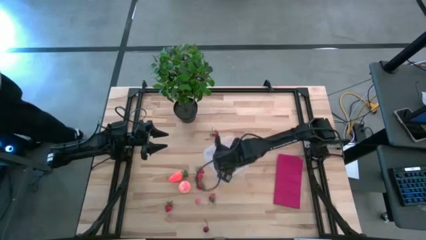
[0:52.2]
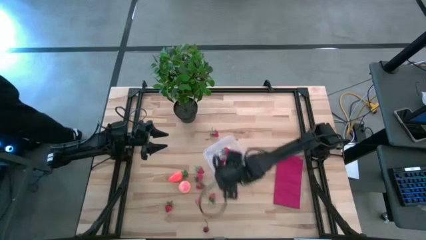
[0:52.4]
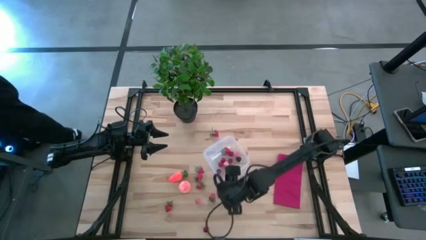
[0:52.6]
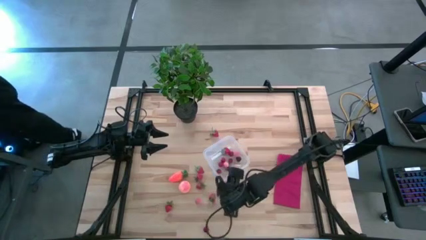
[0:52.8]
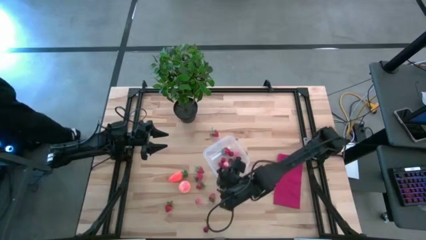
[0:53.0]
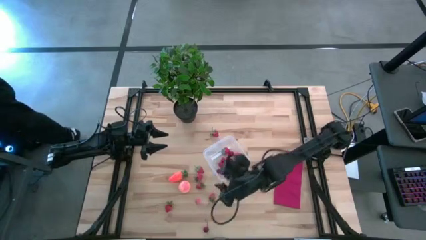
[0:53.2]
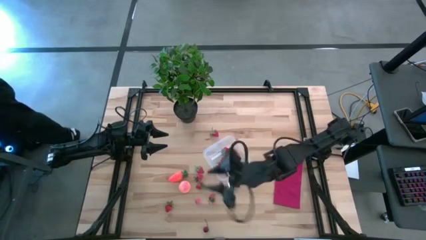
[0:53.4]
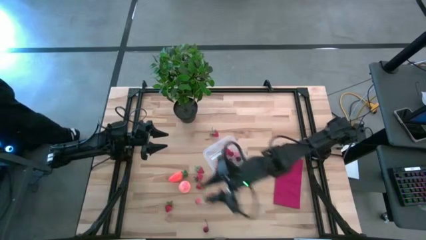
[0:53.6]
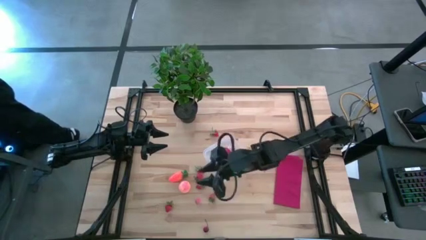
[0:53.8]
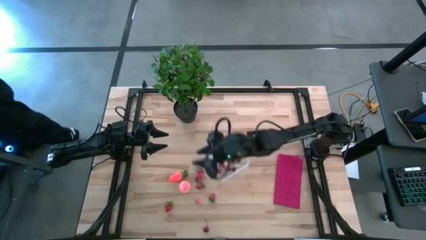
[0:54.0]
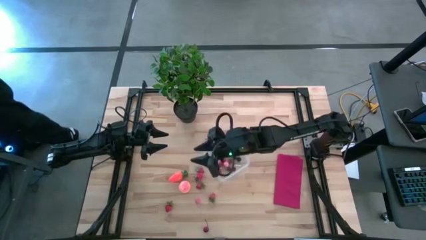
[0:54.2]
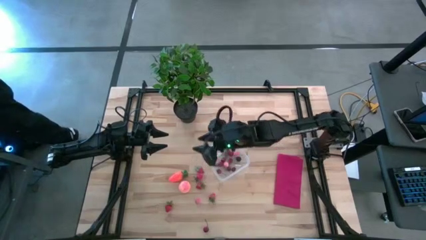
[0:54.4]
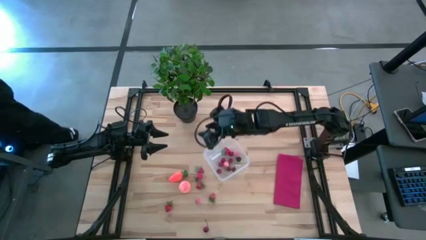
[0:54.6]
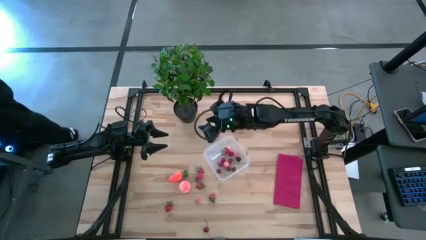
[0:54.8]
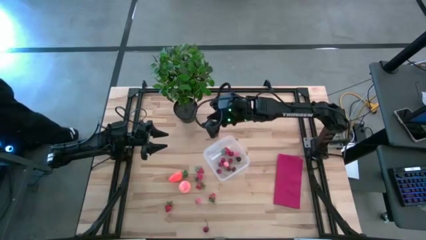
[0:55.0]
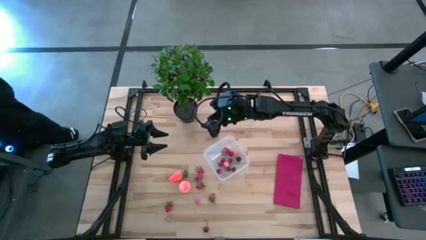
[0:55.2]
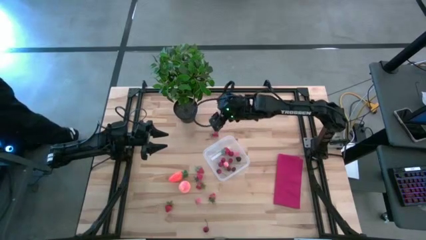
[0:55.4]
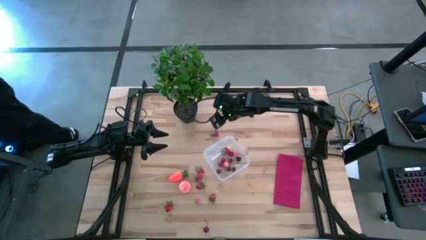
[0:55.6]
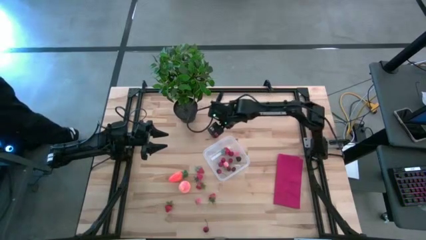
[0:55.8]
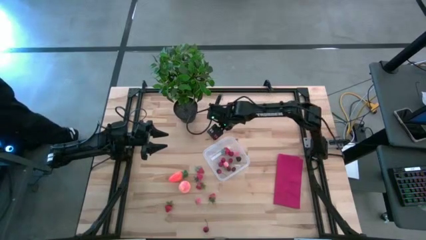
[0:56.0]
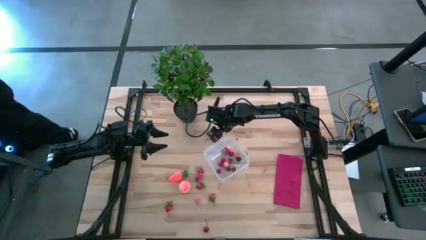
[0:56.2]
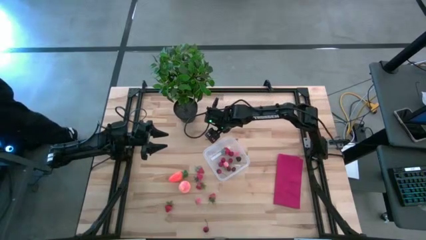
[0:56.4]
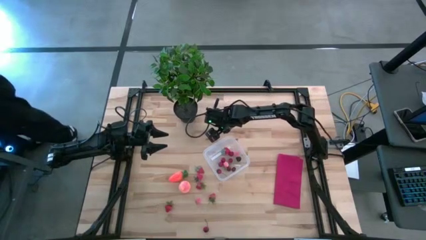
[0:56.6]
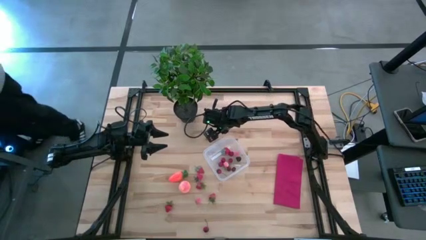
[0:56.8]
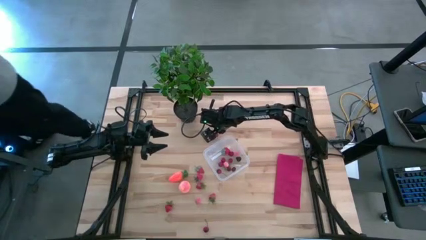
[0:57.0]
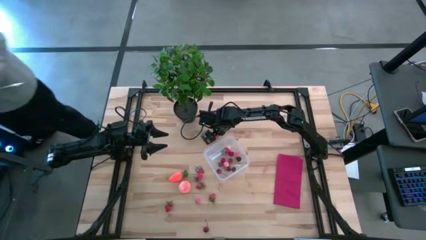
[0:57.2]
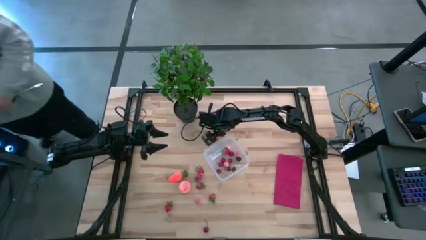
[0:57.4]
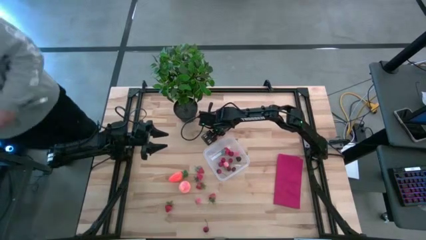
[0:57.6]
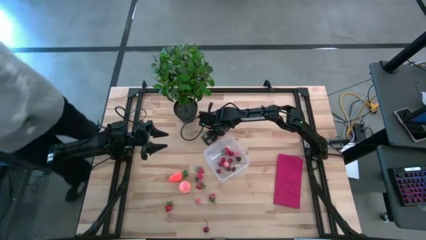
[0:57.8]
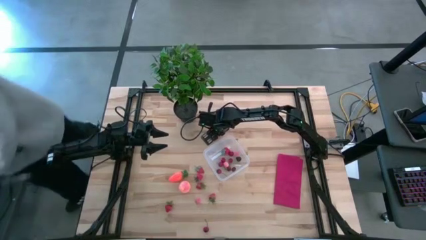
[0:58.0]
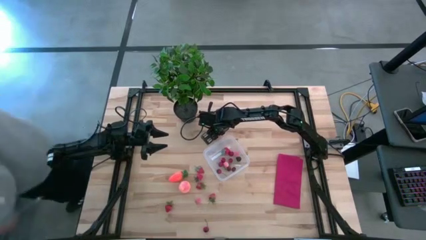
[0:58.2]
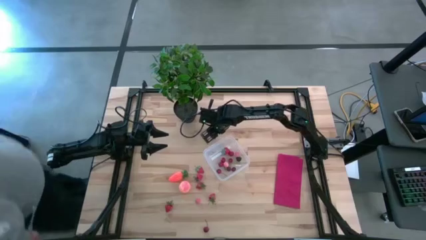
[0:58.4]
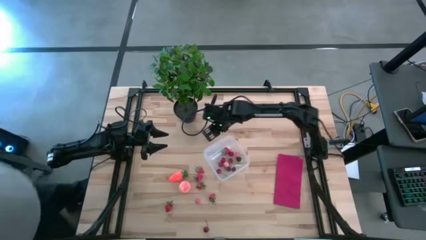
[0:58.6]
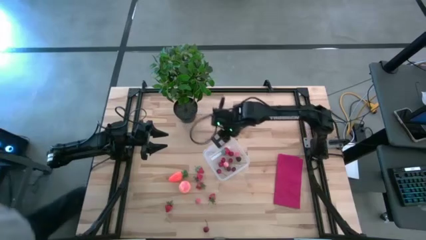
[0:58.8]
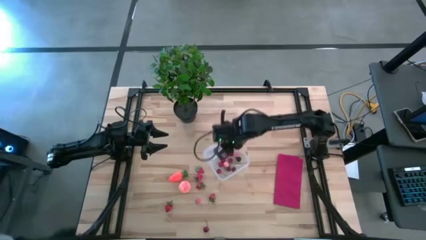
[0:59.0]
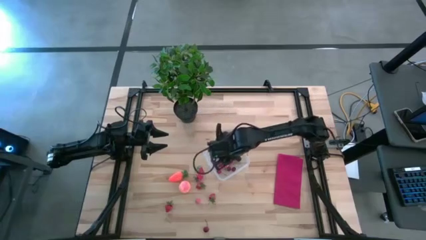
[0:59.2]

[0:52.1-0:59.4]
Task: Pick and placing Produce into tupperware
Put the red strawberry into the transparent bin

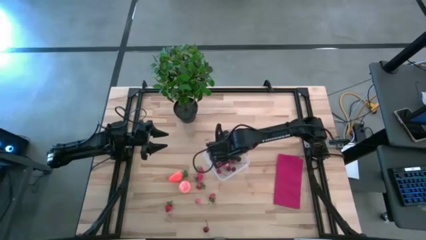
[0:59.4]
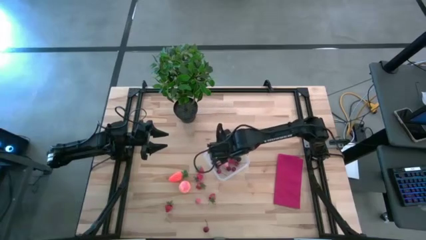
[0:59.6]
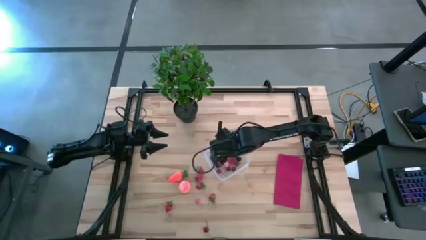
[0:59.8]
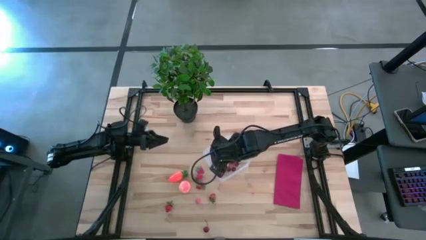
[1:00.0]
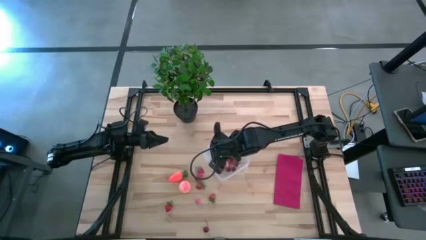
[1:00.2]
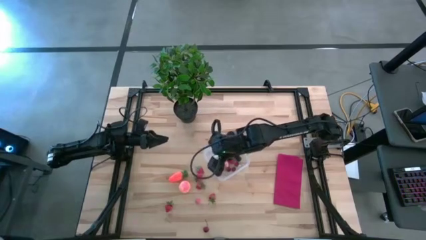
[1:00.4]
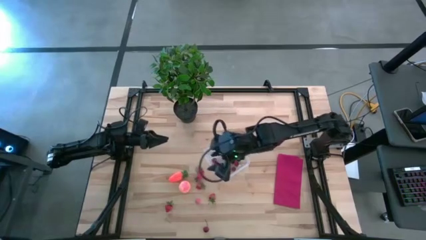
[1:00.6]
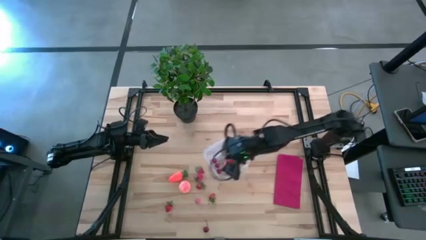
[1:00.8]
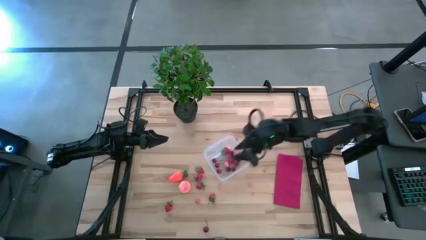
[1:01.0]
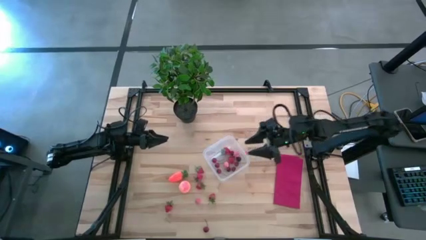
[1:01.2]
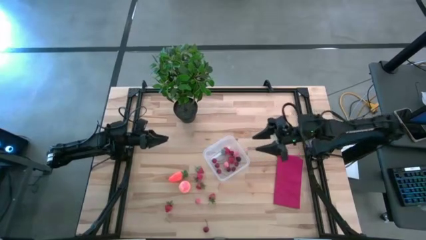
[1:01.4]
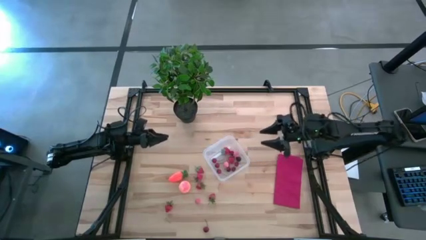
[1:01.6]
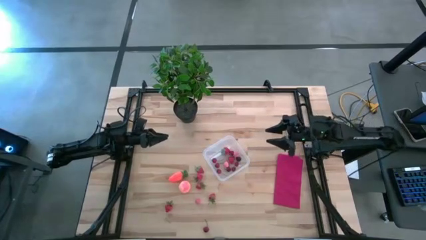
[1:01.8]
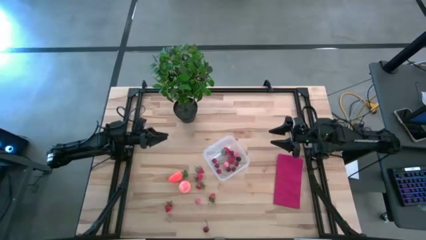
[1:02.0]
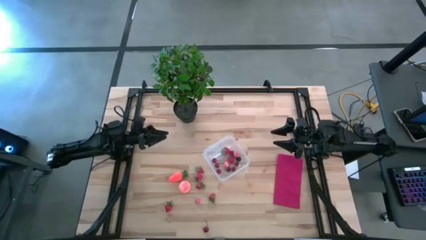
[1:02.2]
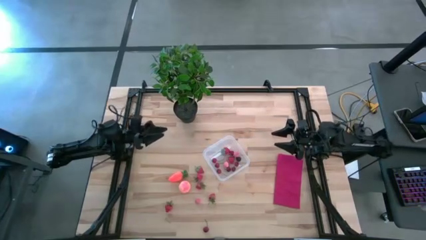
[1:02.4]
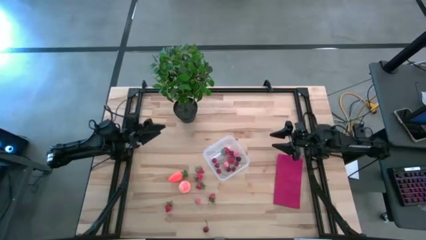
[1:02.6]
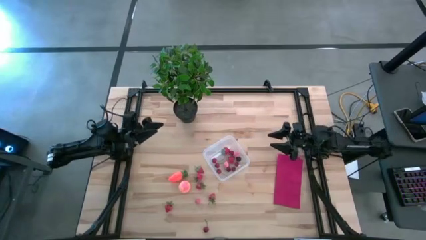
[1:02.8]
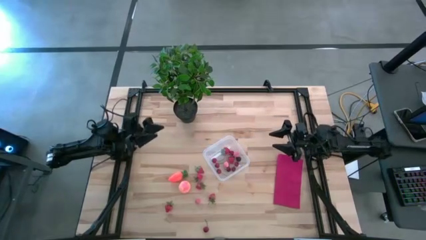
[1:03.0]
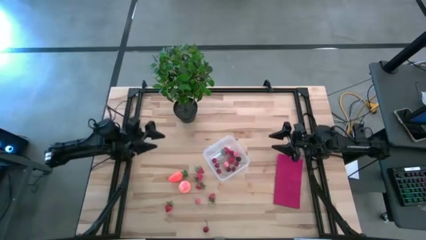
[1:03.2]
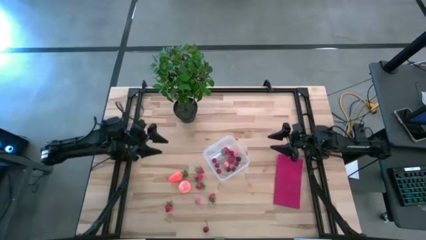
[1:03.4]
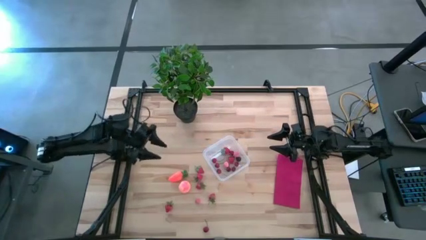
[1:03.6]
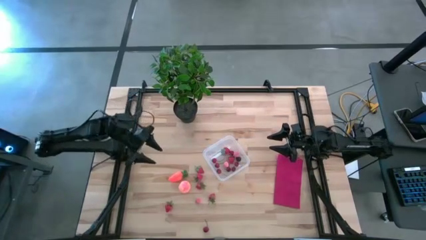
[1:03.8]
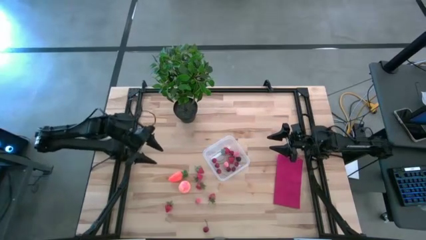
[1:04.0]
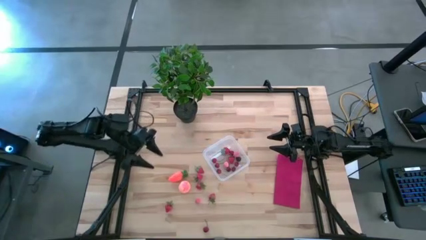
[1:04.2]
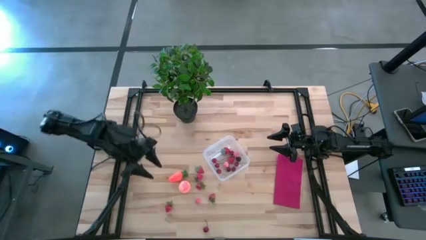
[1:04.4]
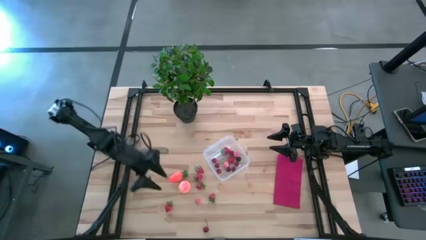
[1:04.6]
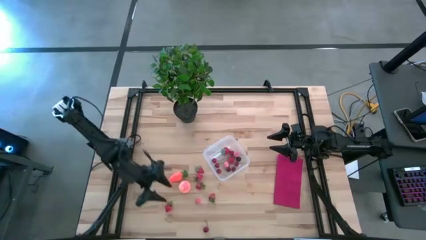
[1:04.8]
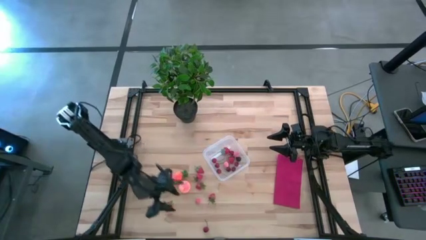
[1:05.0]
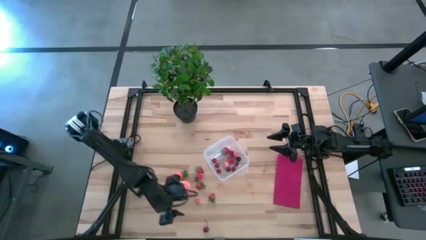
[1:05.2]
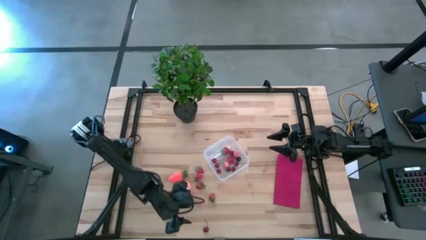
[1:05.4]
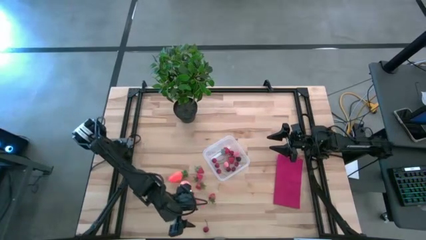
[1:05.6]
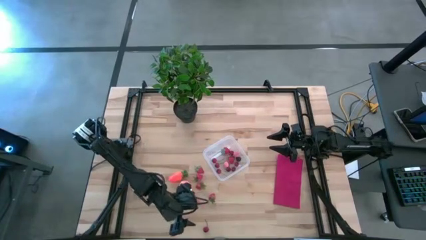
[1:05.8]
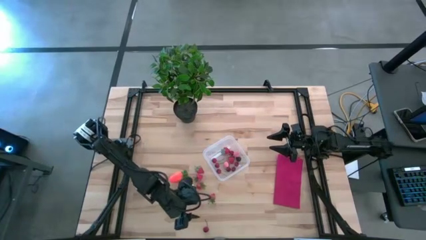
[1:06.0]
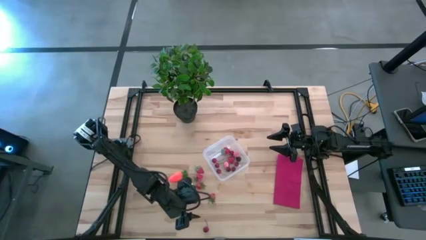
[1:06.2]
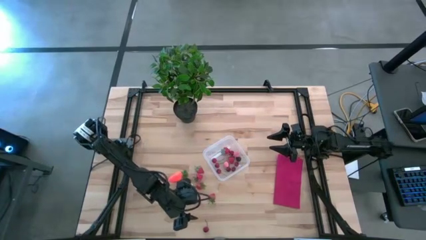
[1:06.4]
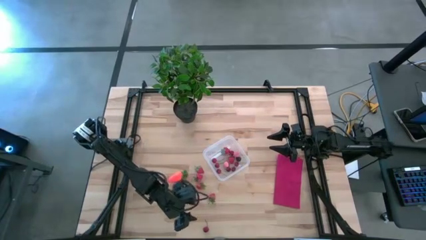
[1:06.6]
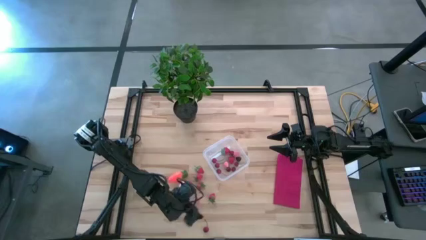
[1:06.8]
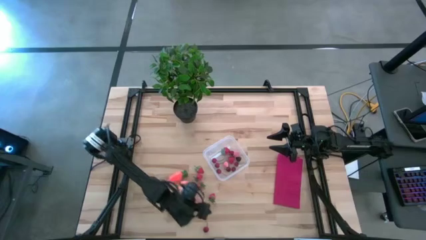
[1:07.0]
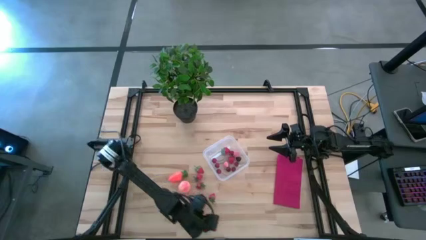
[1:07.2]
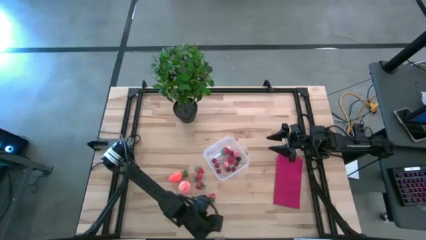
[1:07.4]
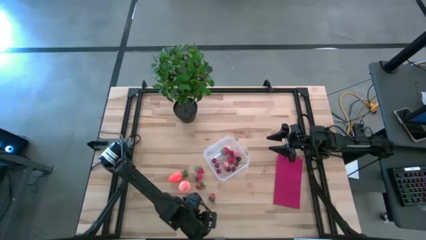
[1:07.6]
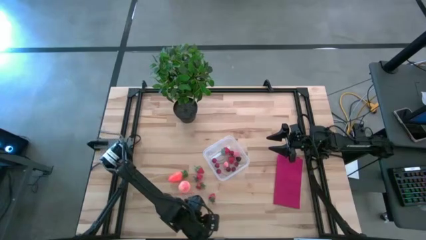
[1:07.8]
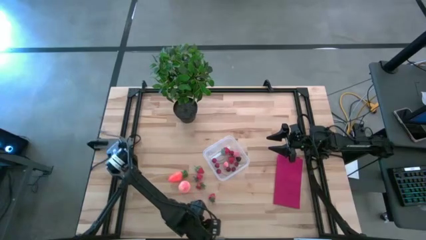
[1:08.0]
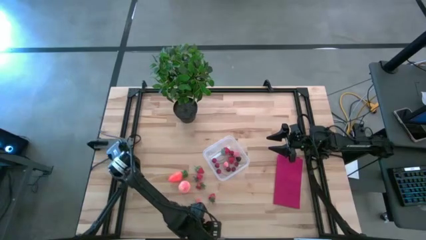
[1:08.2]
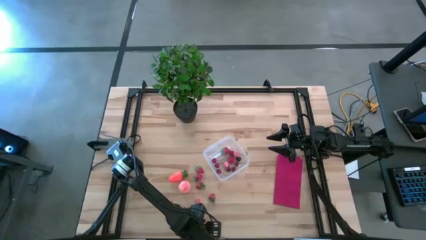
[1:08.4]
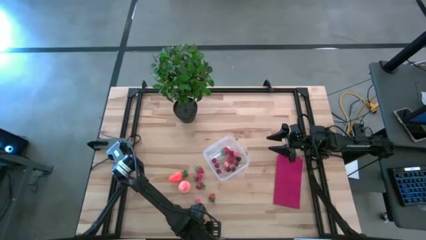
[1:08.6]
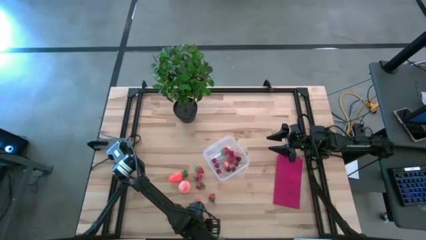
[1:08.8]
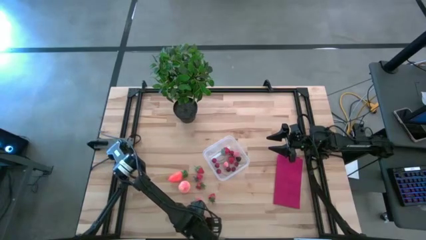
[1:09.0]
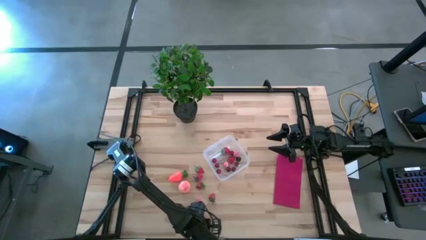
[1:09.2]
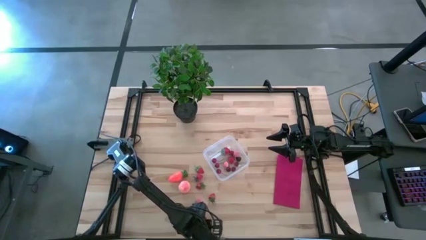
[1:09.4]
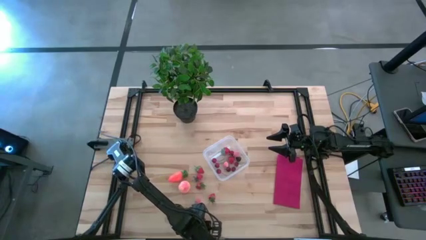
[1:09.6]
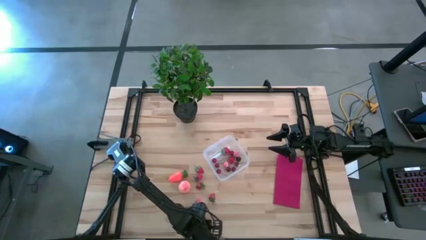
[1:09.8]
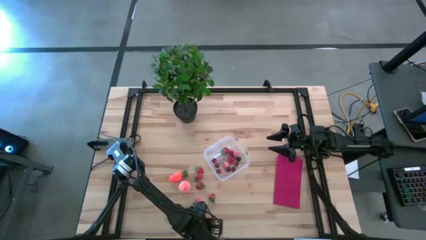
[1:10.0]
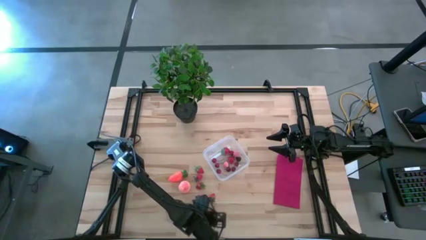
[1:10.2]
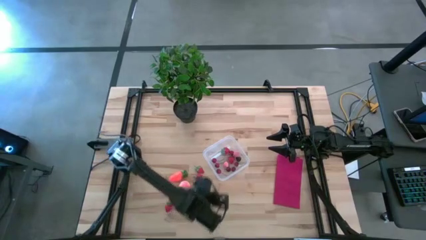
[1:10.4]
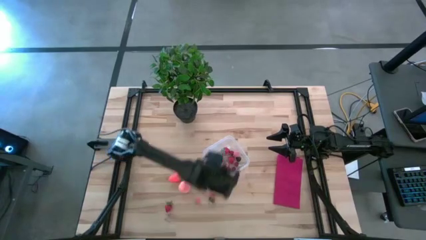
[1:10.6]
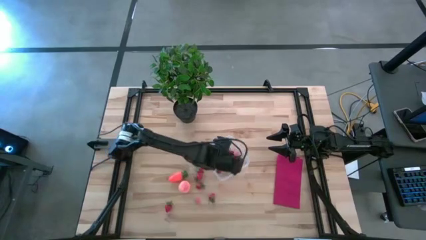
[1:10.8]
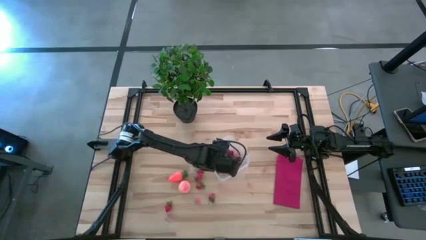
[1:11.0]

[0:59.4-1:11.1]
Put the red cherry into the transparent bin
